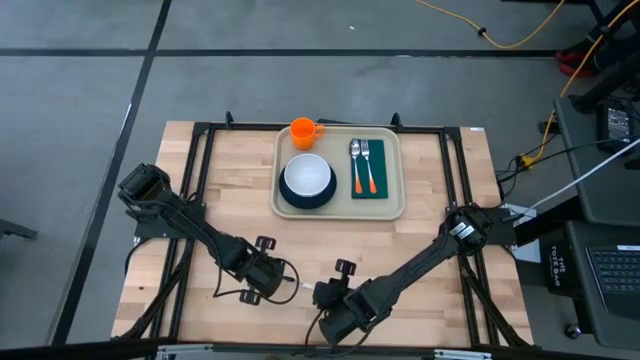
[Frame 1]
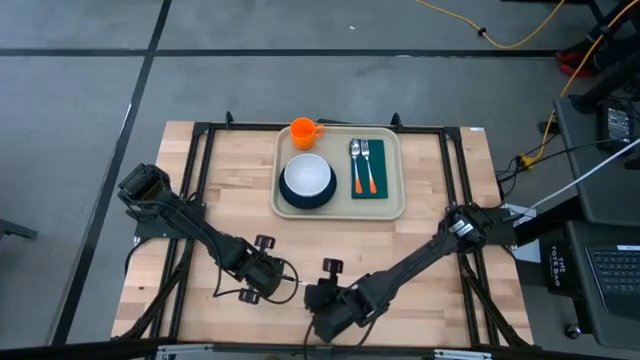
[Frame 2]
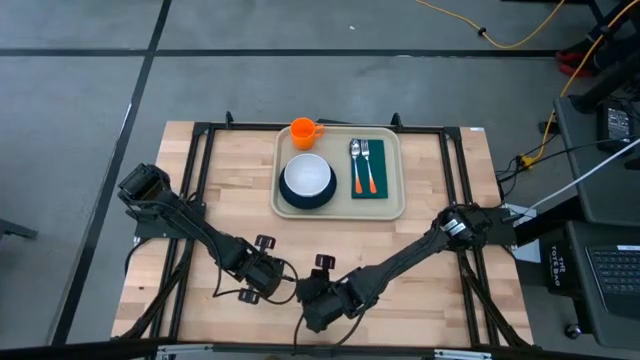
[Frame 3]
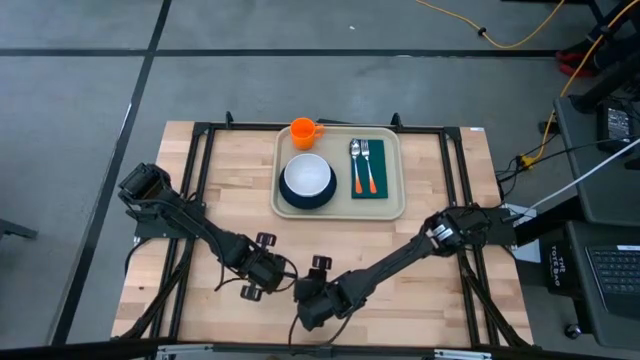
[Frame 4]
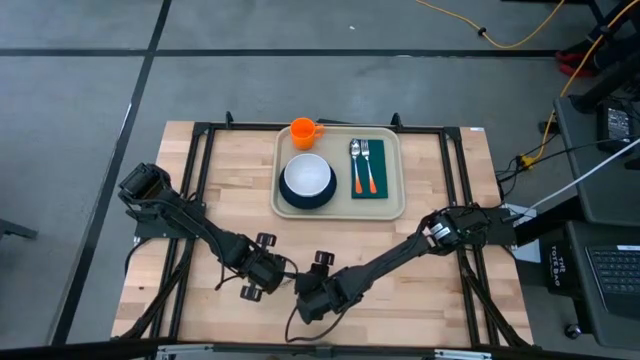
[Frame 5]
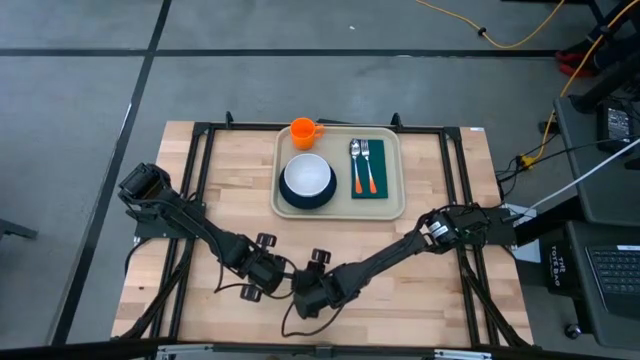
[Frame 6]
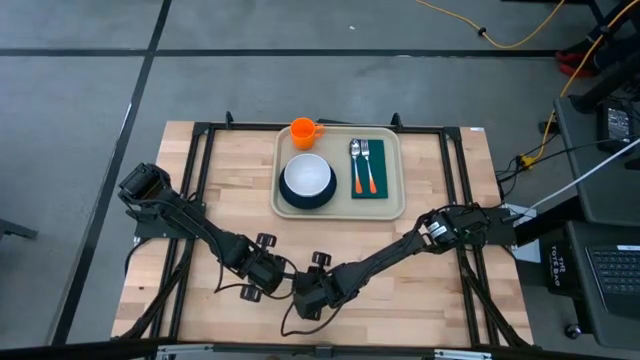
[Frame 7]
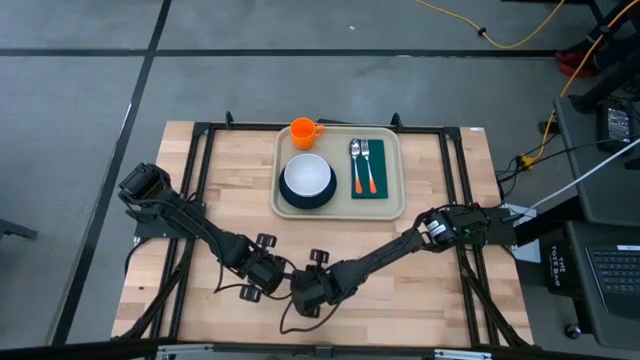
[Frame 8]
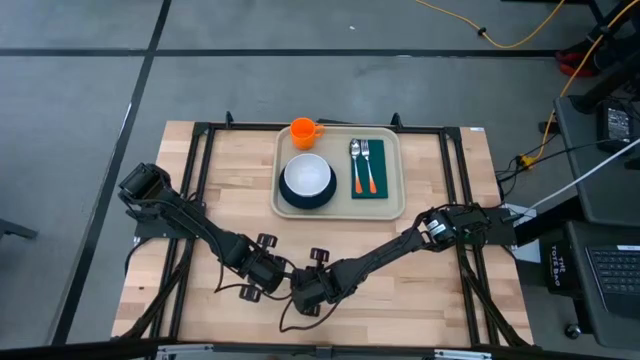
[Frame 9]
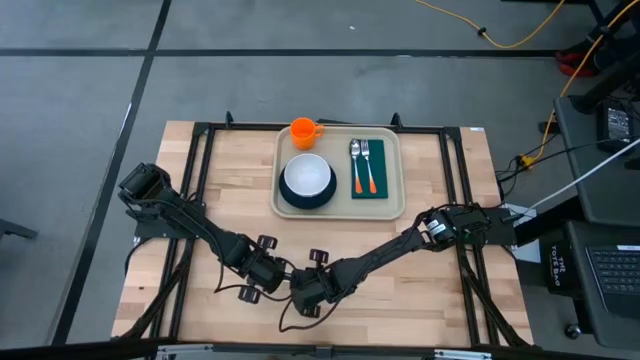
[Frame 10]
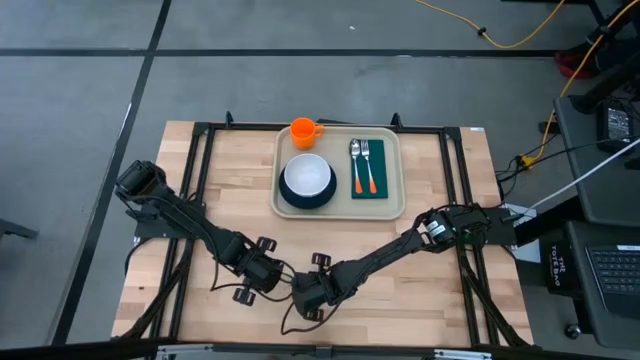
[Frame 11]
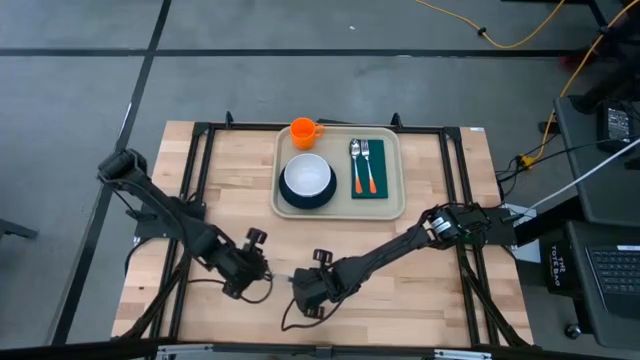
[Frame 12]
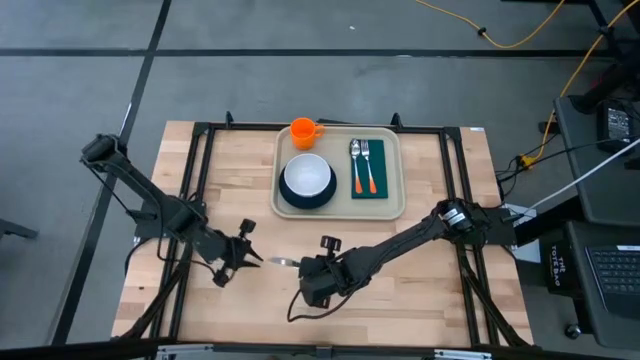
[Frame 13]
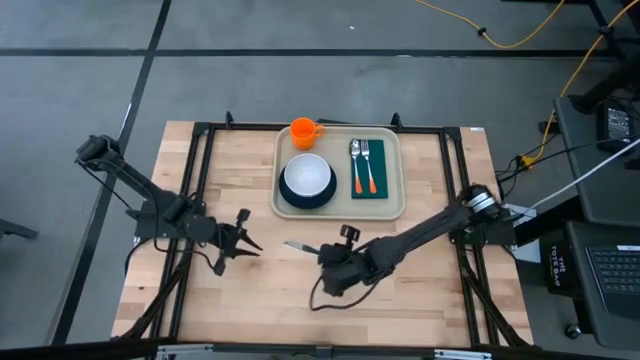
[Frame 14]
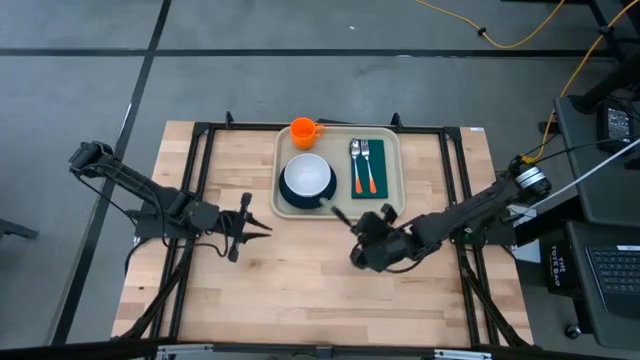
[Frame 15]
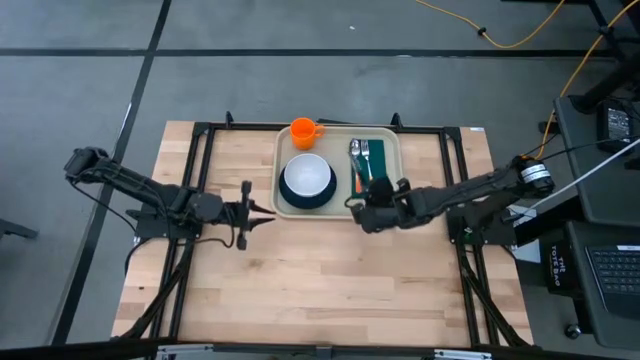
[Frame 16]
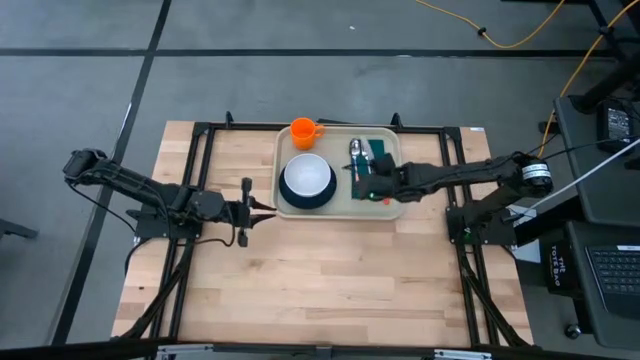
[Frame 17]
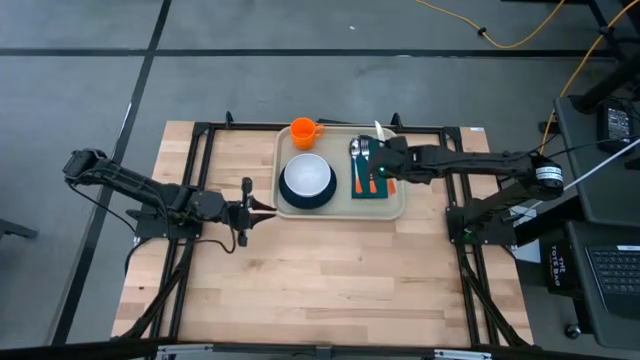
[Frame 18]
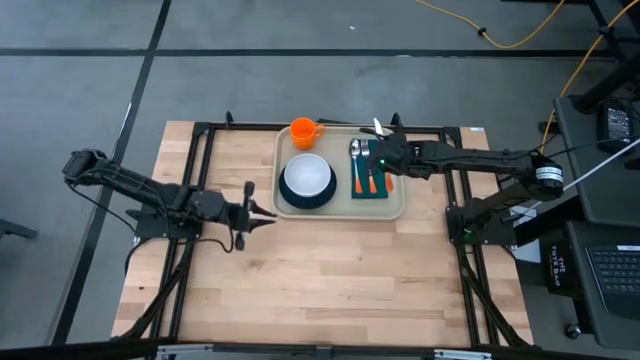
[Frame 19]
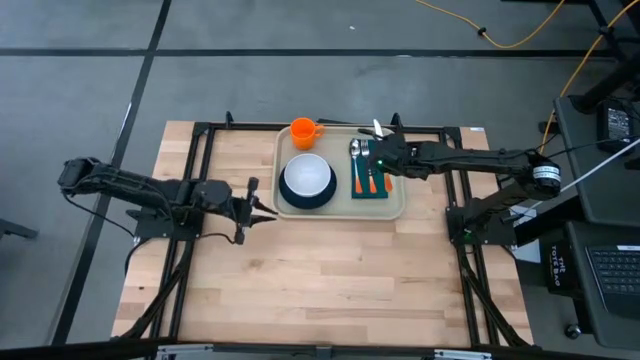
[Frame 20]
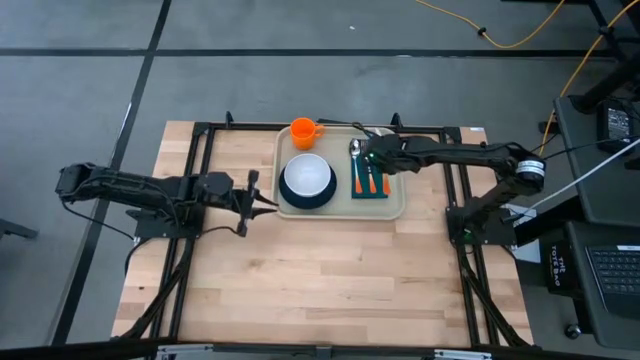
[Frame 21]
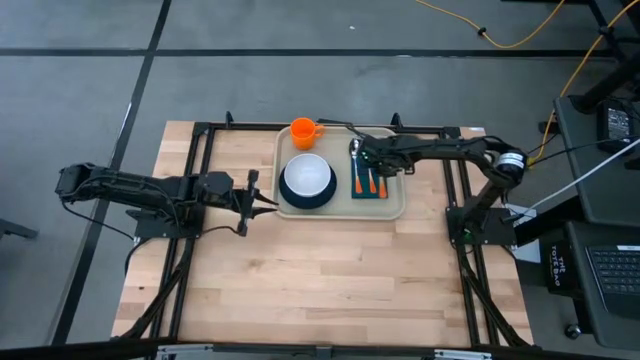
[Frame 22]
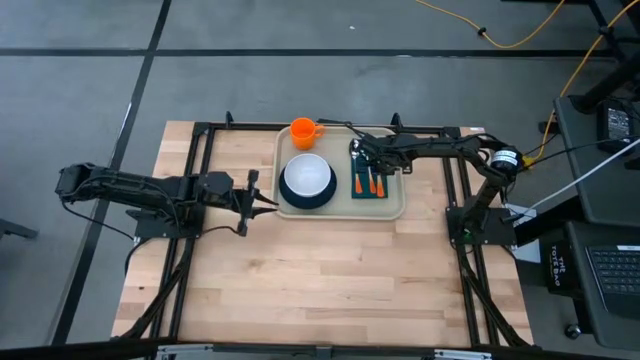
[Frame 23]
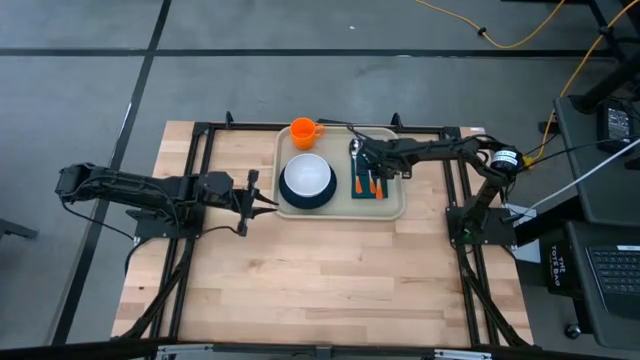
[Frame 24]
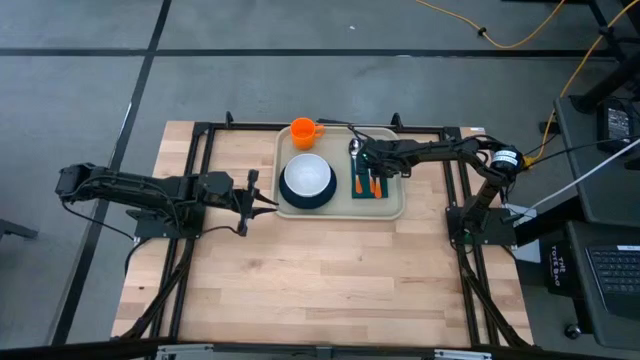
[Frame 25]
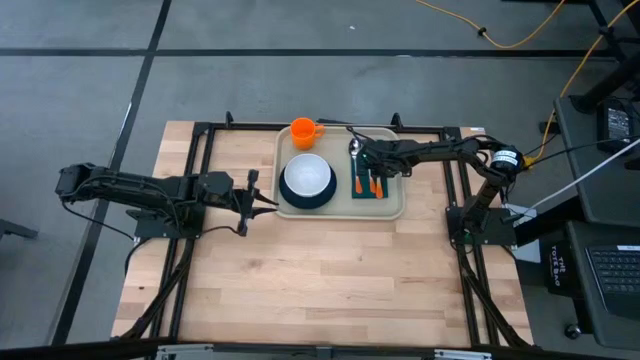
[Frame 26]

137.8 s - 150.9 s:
Task: Set up tray
Put the orange knife on the dark green napkin on the gray tray

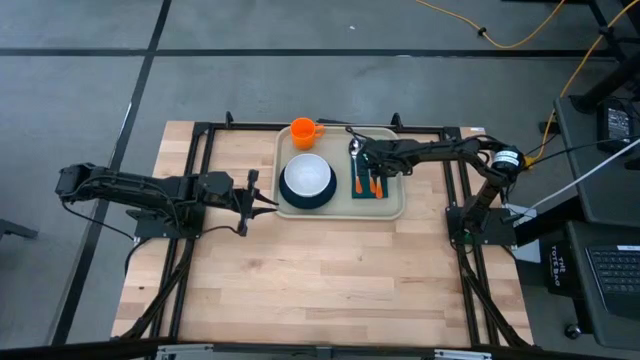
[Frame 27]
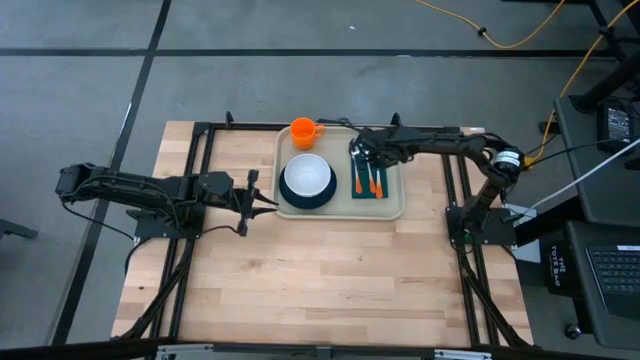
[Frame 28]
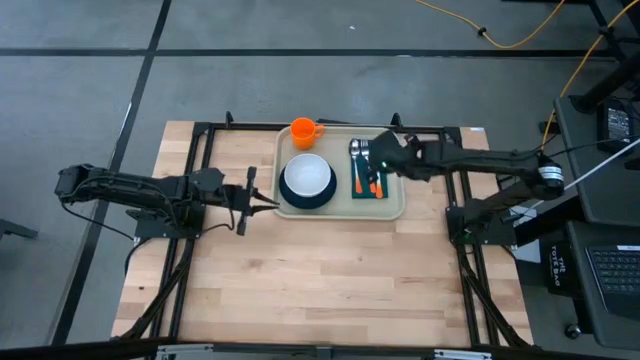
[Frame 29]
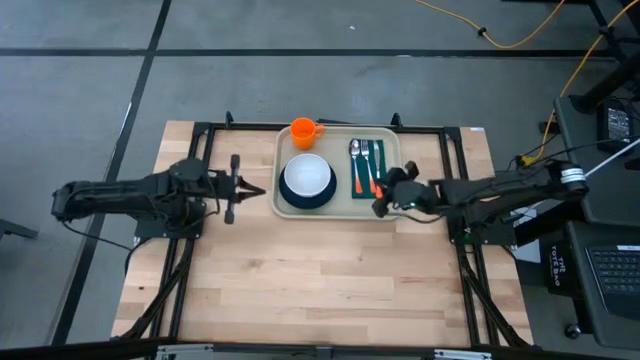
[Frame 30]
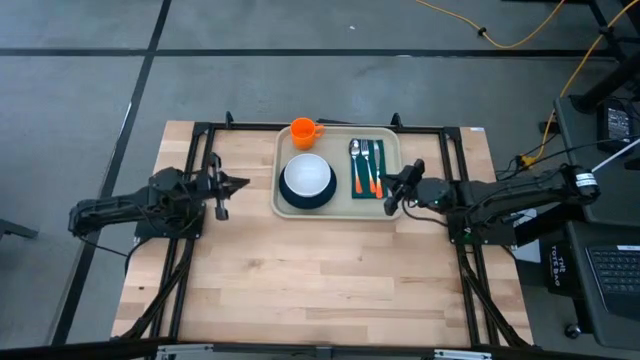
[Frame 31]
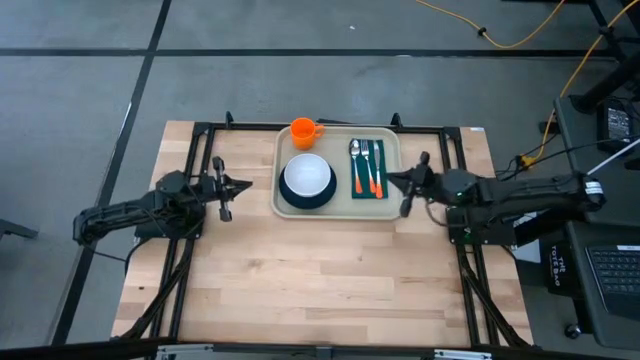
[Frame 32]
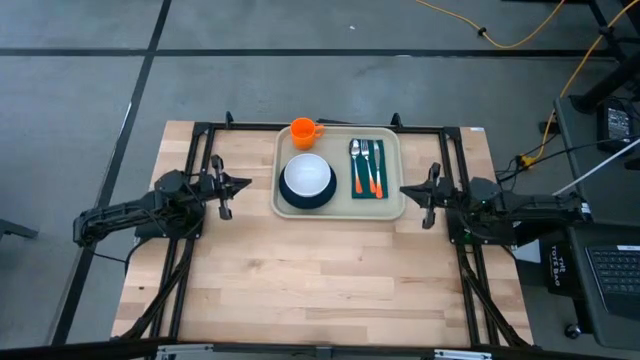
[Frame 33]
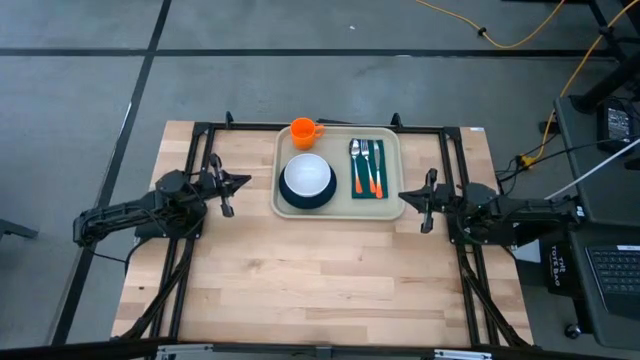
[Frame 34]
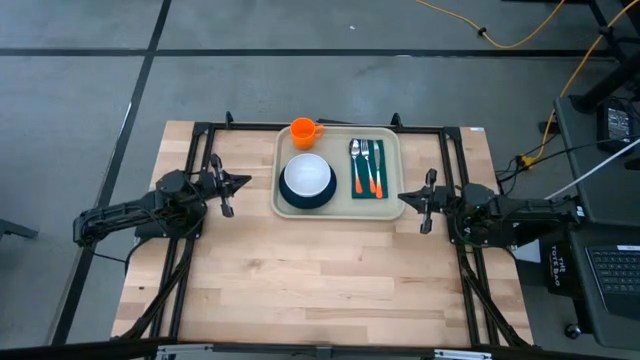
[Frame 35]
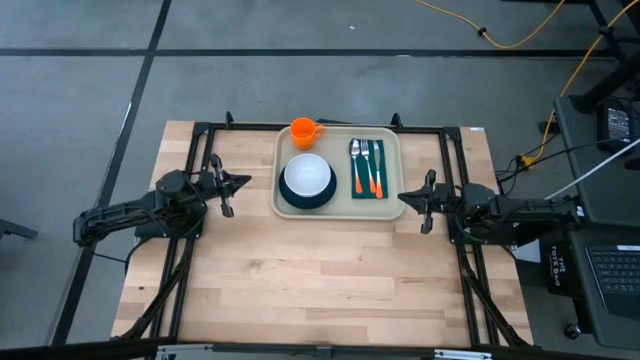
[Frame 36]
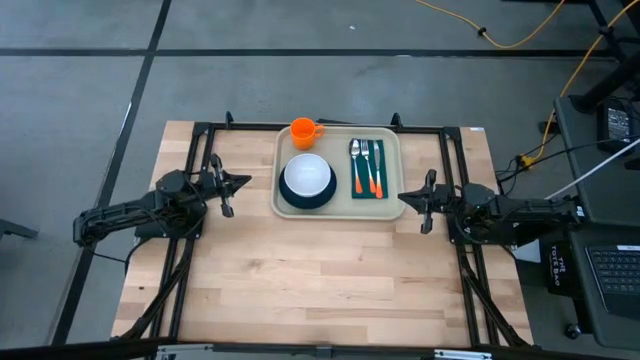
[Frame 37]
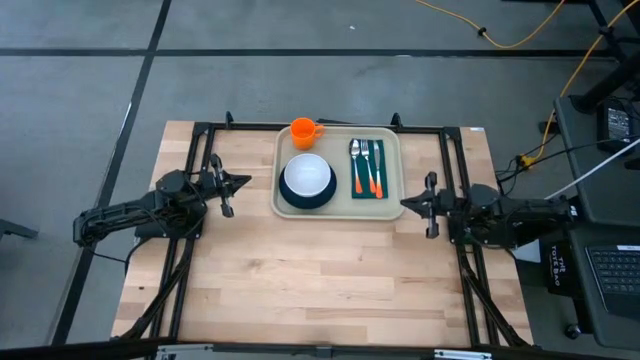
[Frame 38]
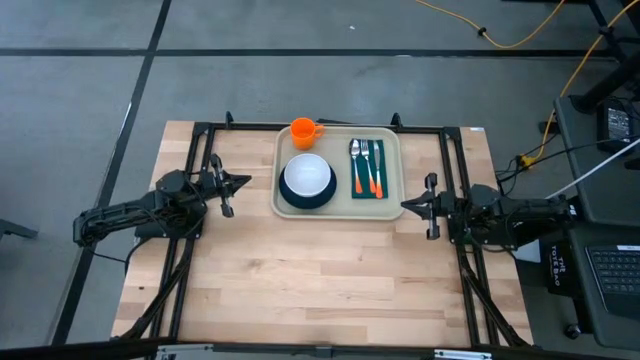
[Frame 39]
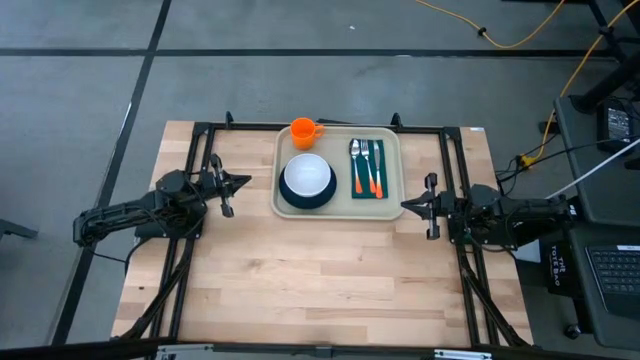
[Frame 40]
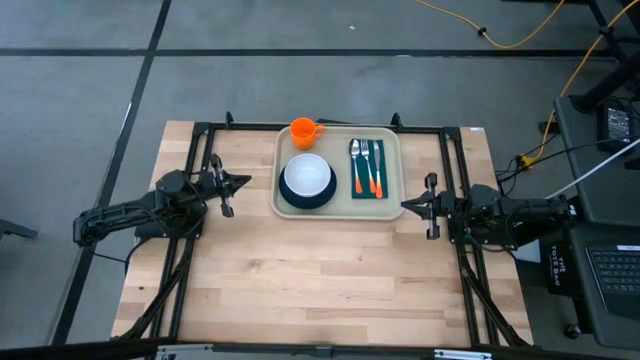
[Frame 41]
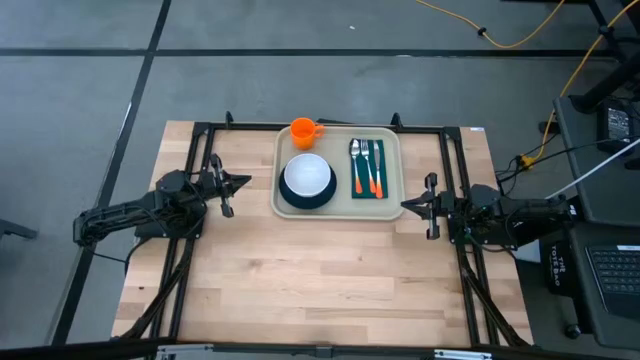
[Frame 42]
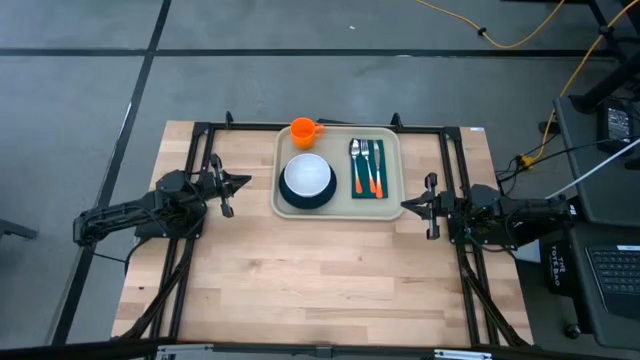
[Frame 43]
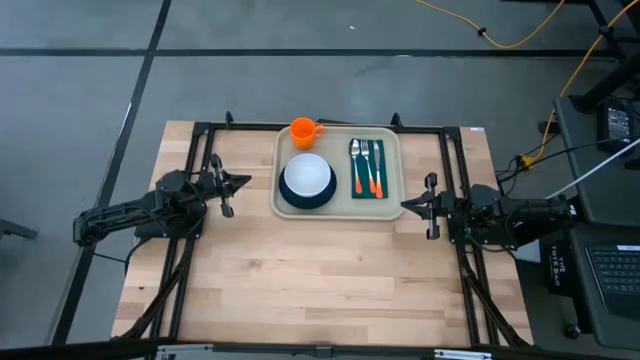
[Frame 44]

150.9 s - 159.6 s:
Return to Home Position
